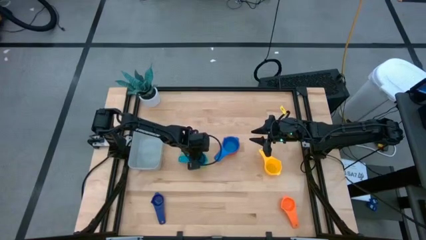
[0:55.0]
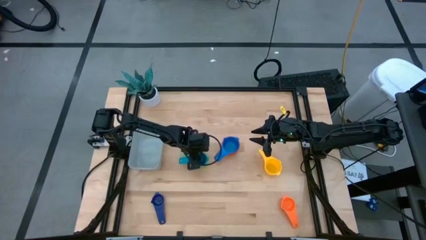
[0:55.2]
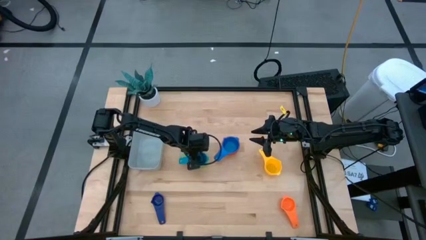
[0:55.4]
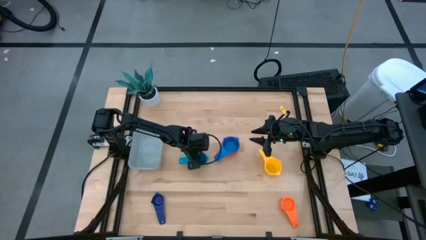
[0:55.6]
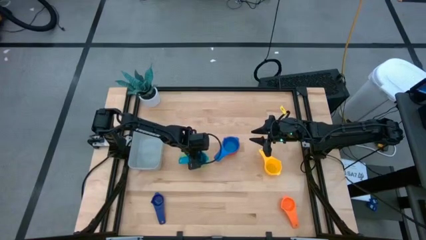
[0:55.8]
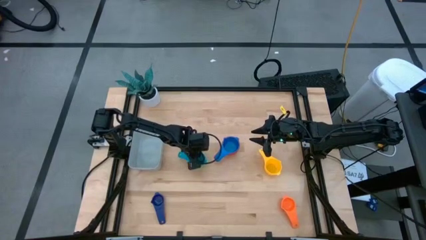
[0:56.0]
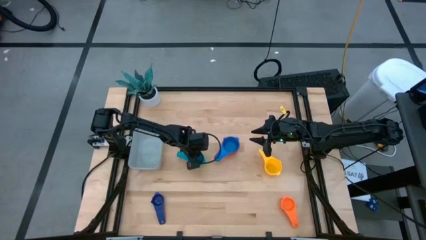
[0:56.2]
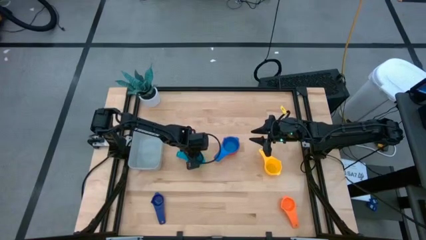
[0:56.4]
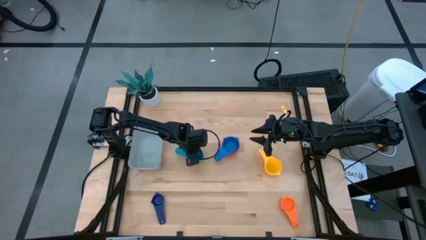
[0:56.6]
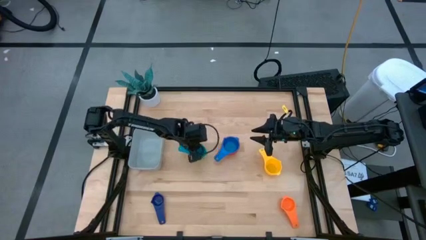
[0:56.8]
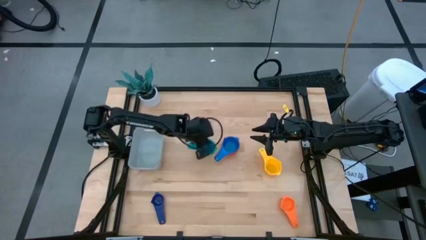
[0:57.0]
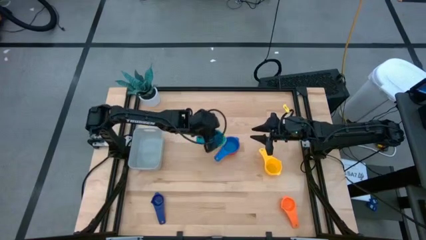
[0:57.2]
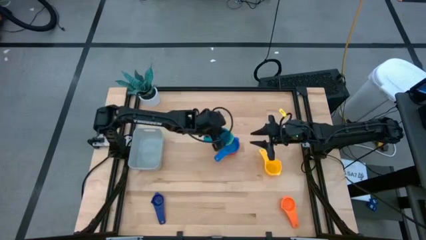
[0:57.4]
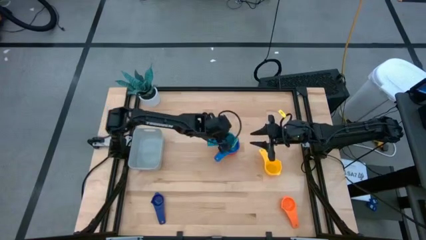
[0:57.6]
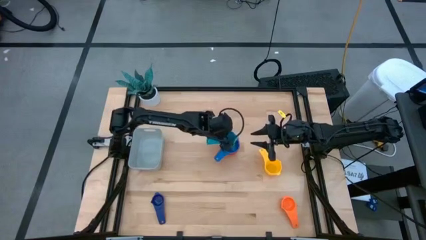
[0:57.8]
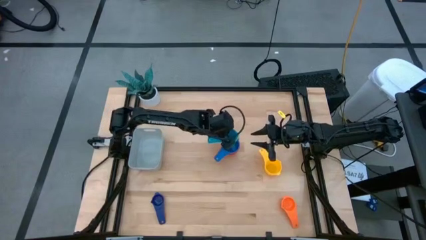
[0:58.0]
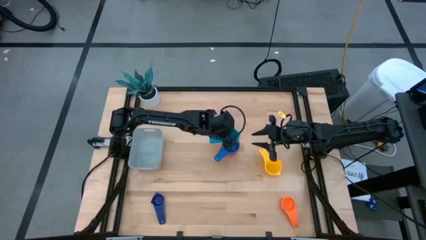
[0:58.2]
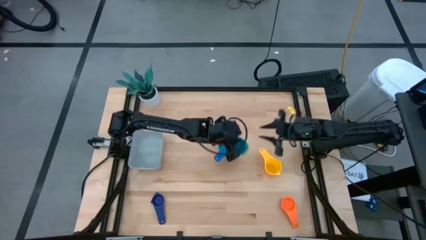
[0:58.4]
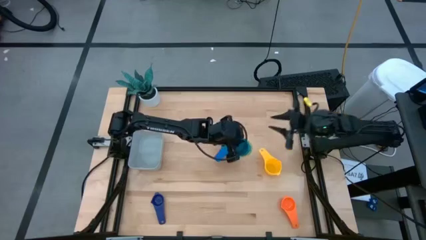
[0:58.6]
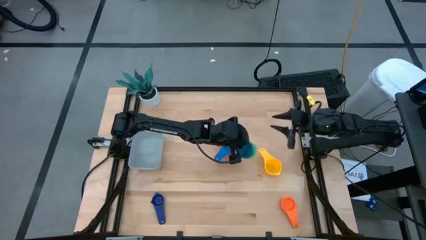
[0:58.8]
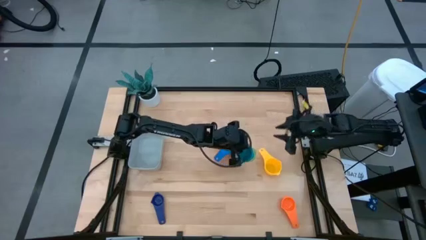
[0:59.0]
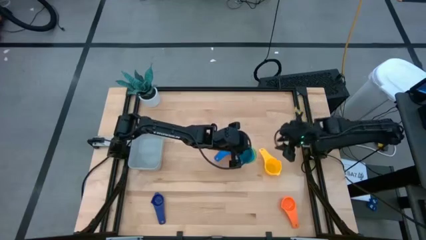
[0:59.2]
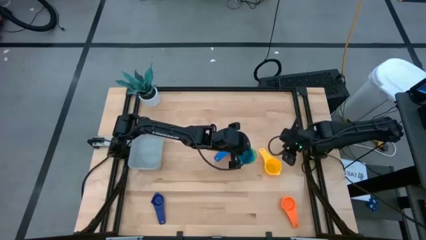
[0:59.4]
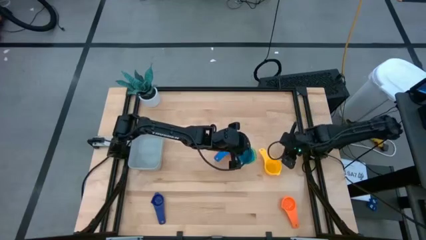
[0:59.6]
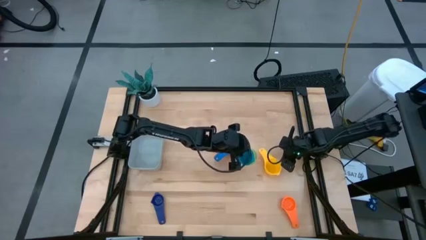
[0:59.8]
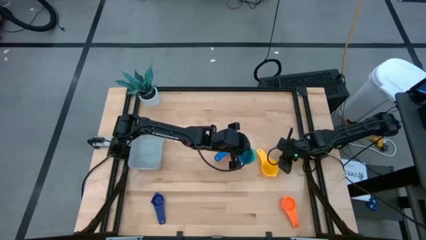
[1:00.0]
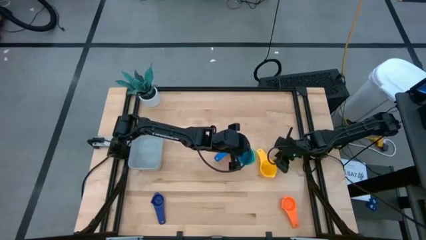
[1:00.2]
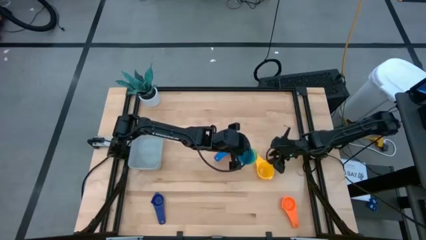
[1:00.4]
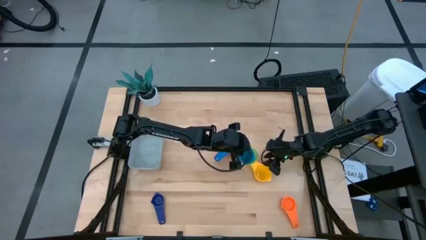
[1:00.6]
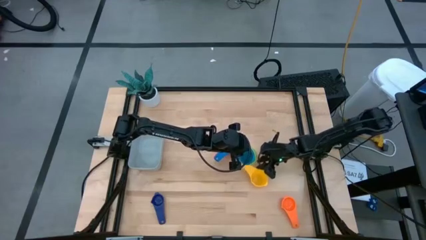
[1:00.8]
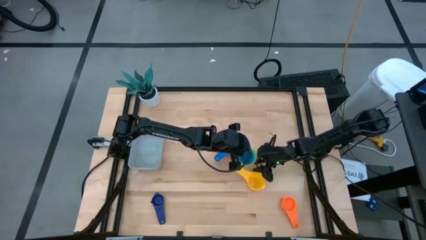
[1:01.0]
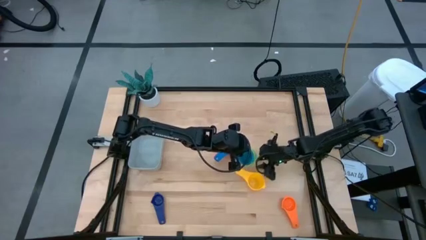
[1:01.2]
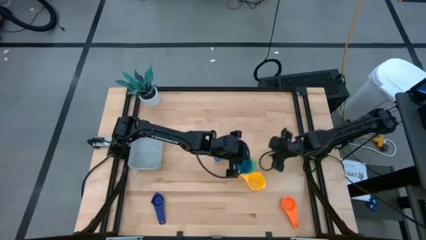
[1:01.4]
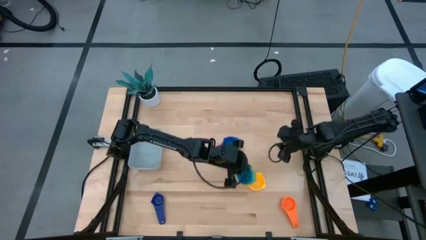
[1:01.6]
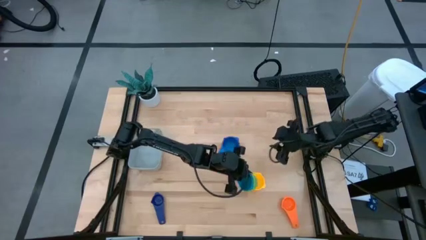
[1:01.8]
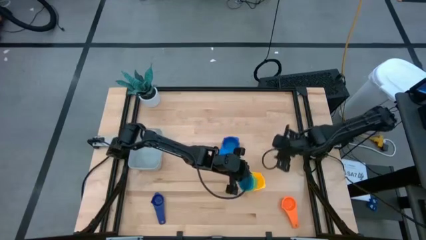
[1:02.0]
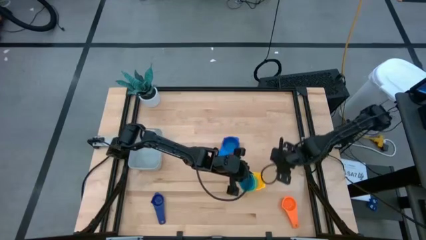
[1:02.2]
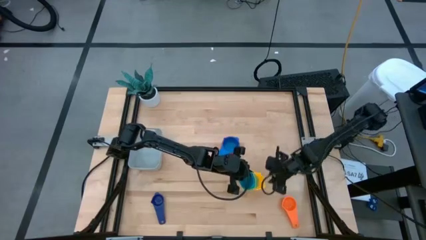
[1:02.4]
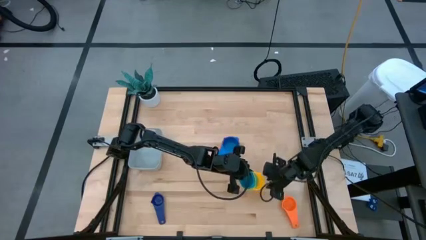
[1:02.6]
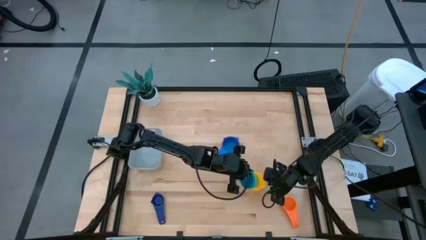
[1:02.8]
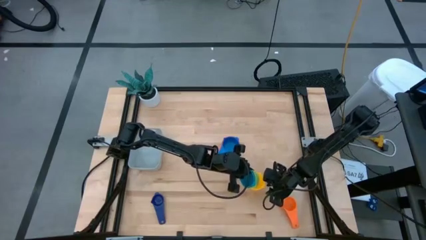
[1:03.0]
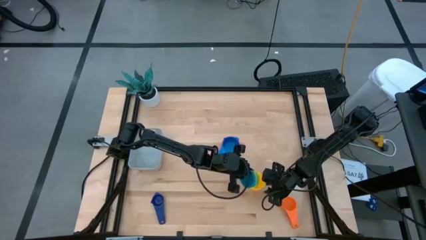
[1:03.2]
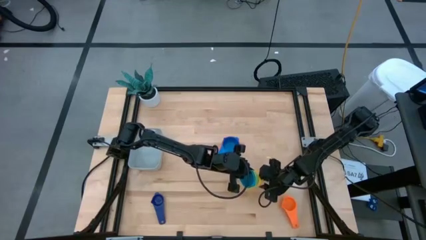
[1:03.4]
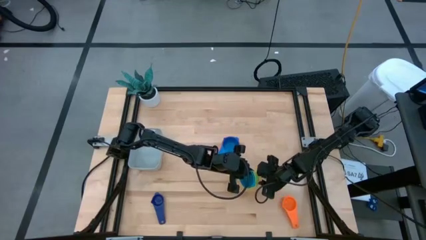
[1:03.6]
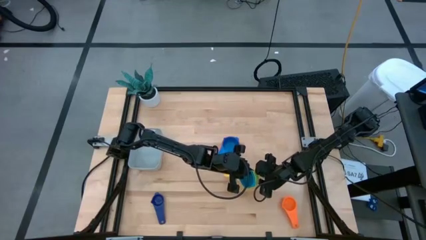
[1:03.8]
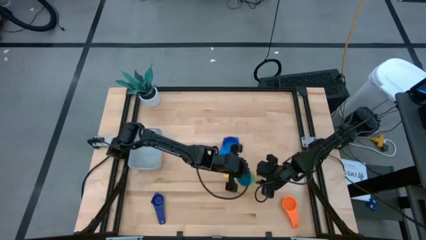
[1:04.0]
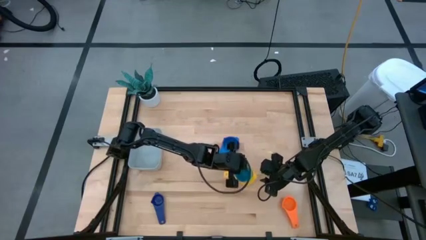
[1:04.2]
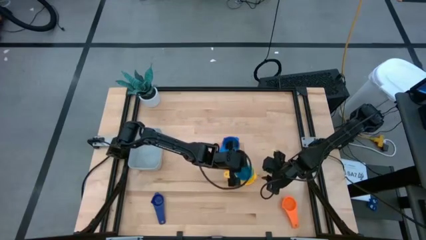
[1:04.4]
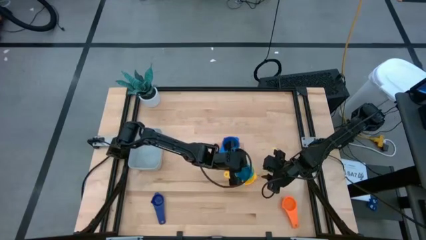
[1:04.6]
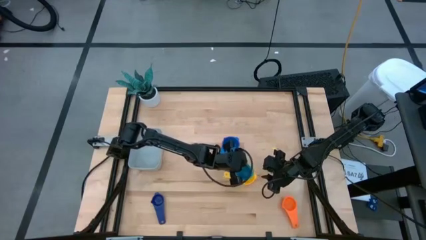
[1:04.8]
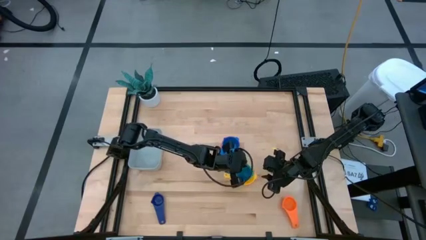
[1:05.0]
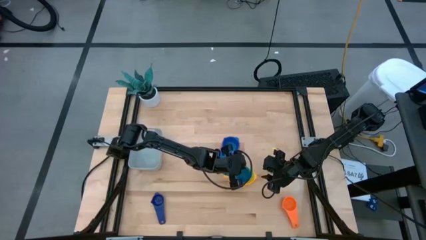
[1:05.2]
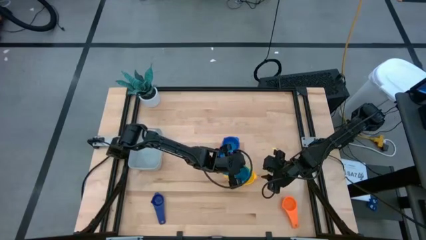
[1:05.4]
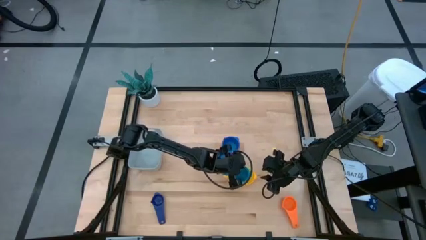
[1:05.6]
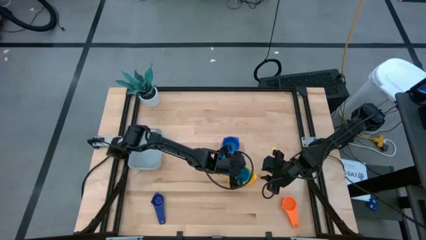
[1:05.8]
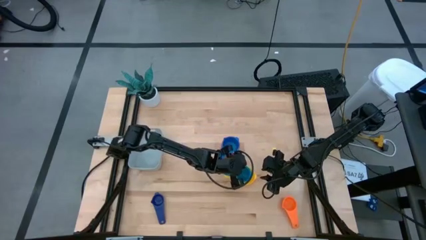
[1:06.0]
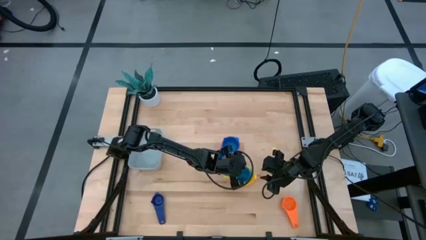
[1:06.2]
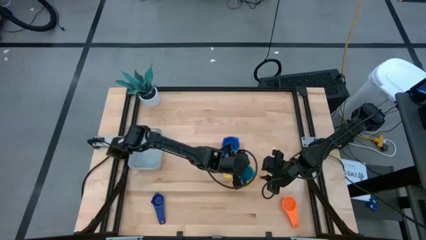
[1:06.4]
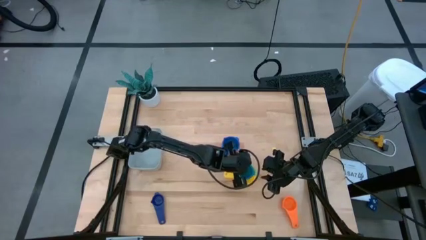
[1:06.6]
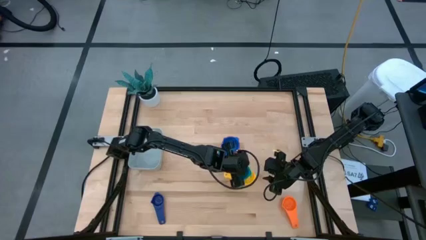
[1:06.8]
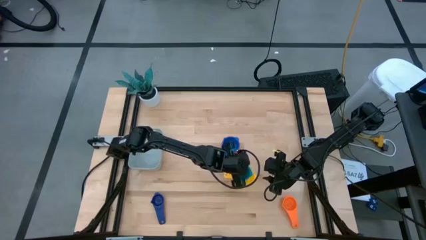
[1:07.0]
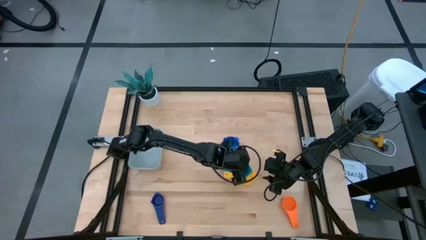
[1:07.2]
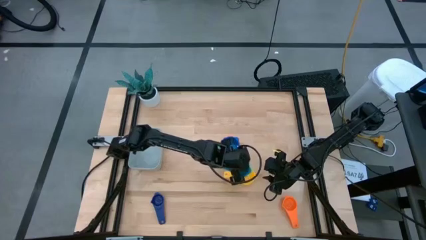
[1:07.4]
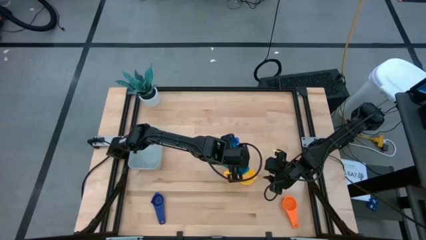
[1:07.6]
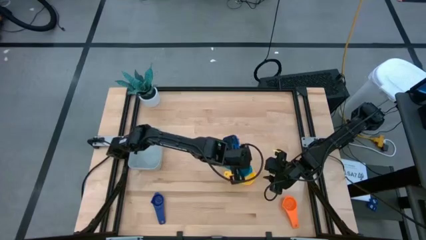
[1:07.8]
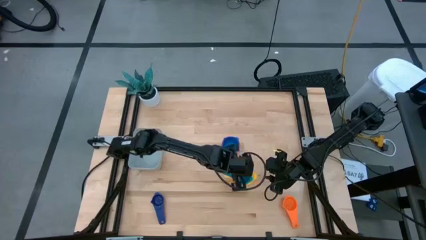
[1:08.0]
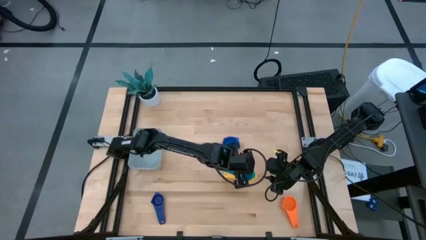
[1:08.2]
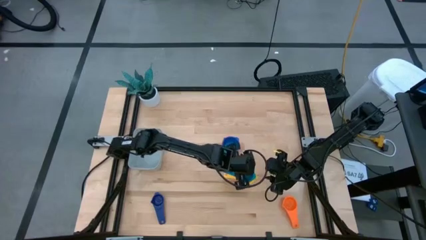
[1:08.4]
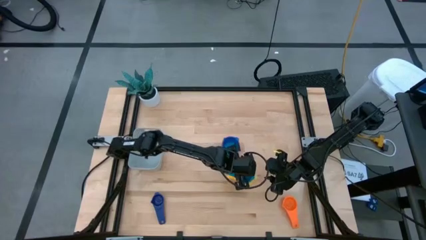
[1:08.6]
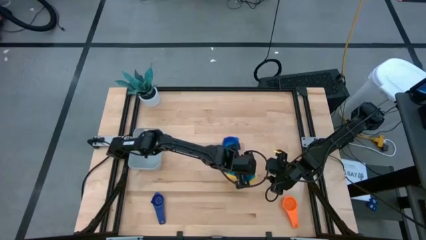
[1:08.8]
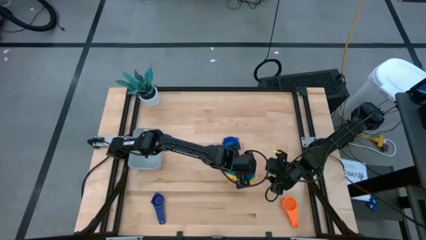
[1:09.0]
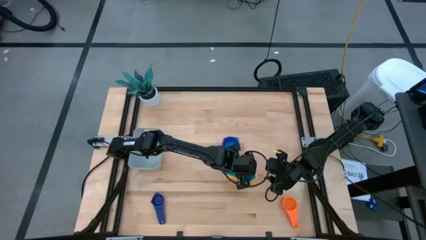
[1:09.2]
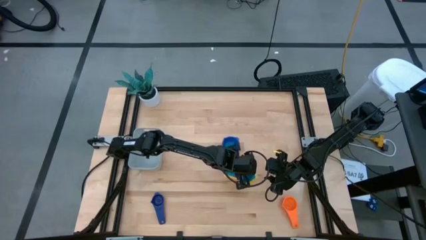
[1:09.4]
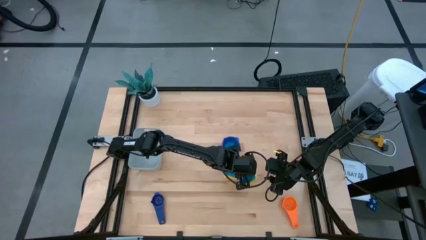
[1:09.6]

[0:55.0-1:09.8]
Task: Nest measuring cups in basket
Stack the left stacked measuring cups on top of the yellow measuring cup
